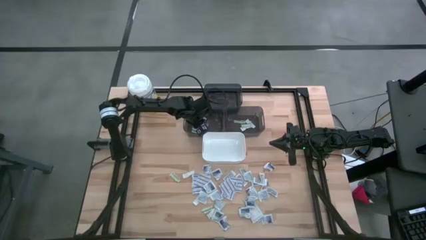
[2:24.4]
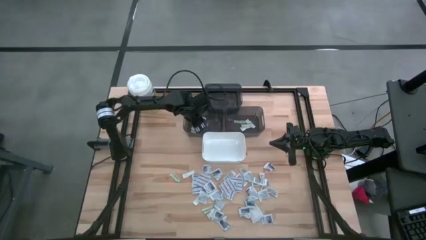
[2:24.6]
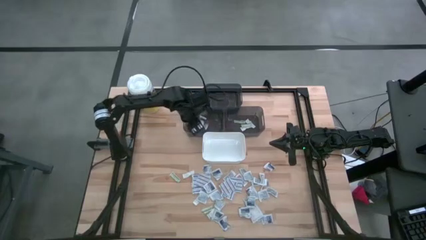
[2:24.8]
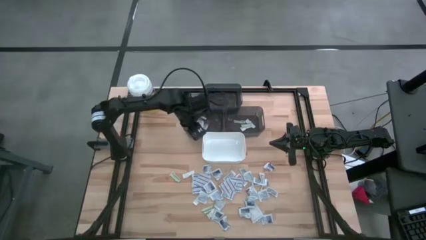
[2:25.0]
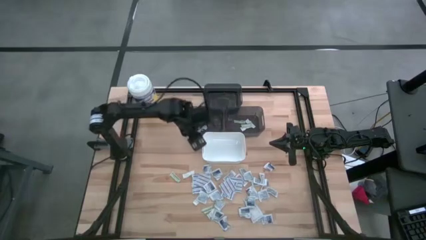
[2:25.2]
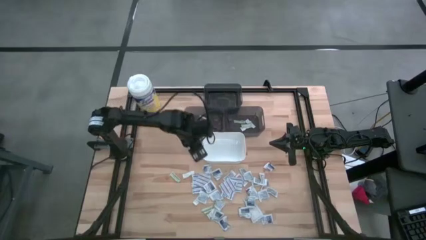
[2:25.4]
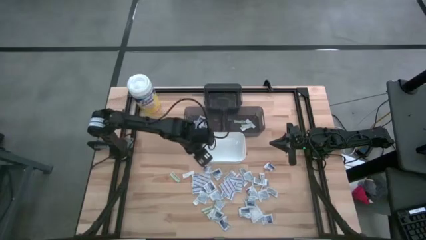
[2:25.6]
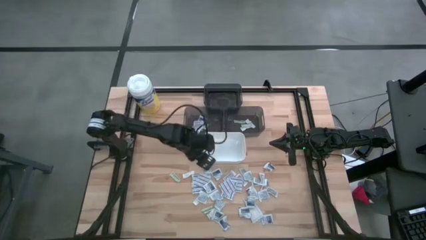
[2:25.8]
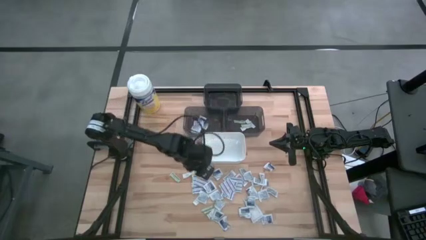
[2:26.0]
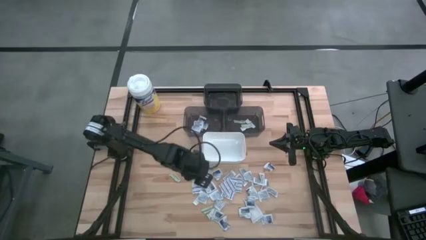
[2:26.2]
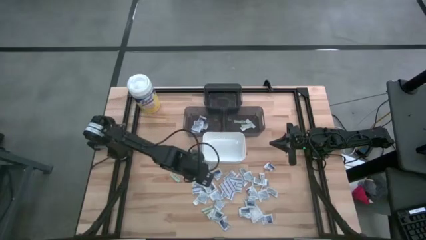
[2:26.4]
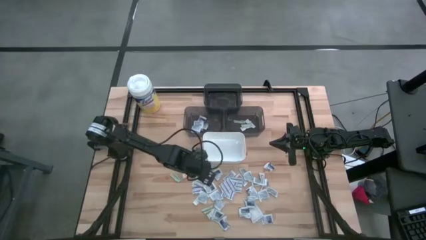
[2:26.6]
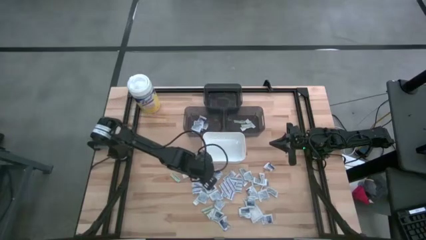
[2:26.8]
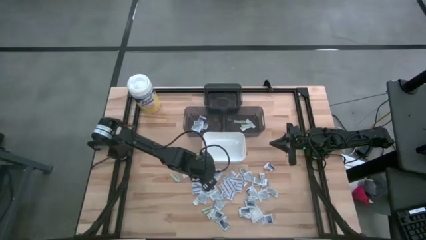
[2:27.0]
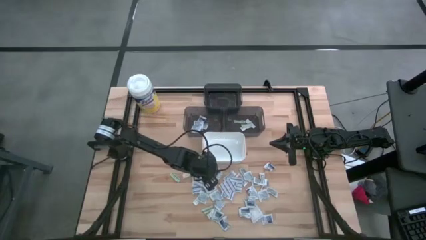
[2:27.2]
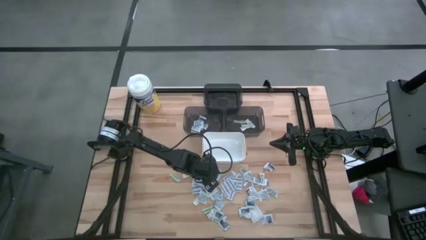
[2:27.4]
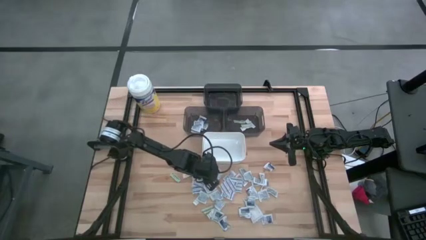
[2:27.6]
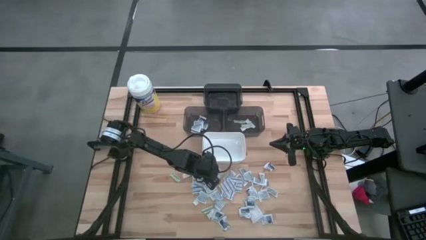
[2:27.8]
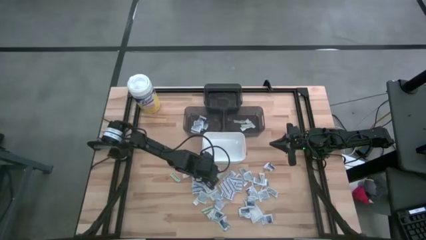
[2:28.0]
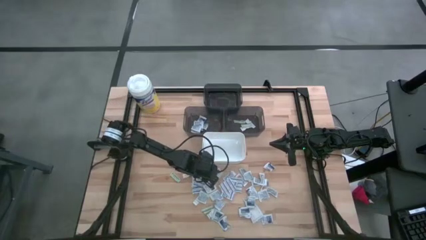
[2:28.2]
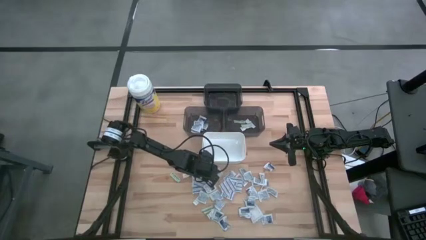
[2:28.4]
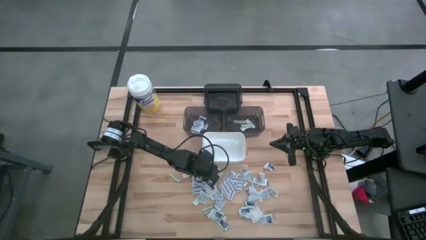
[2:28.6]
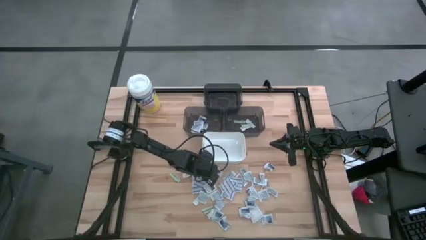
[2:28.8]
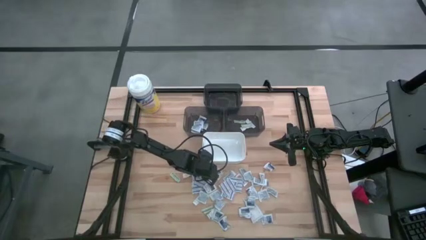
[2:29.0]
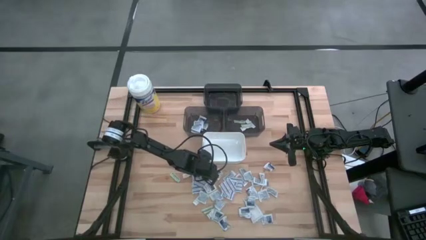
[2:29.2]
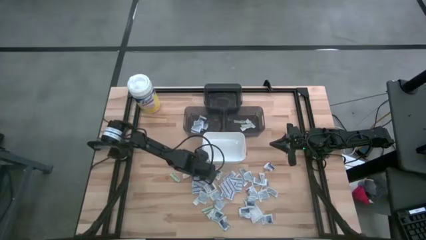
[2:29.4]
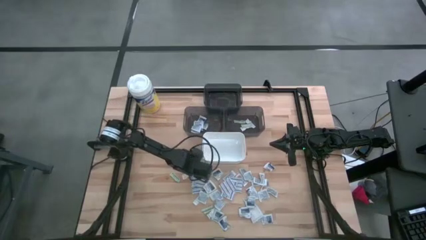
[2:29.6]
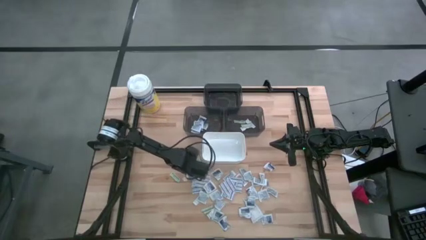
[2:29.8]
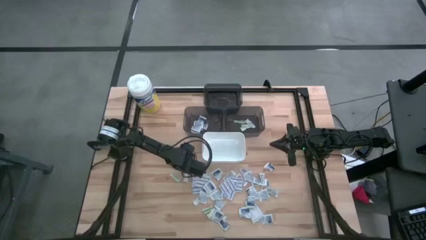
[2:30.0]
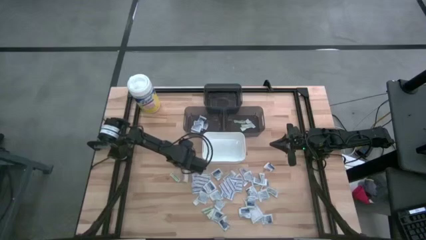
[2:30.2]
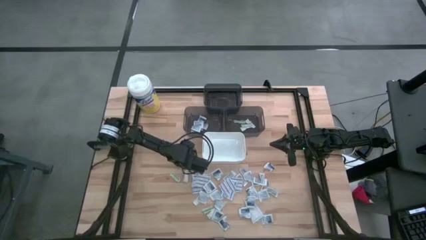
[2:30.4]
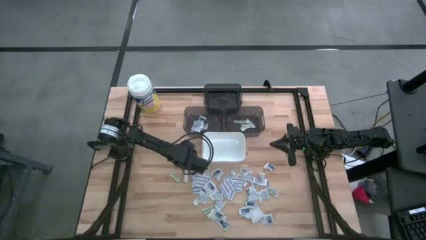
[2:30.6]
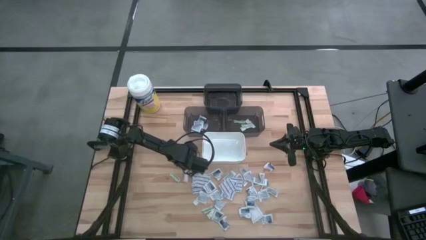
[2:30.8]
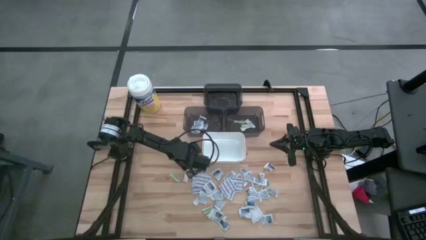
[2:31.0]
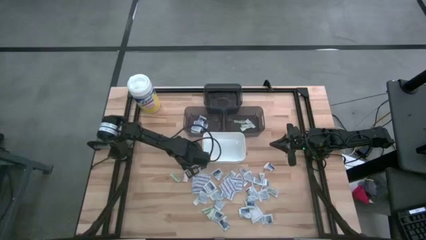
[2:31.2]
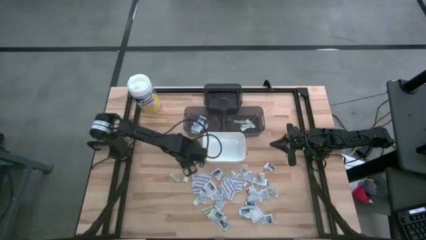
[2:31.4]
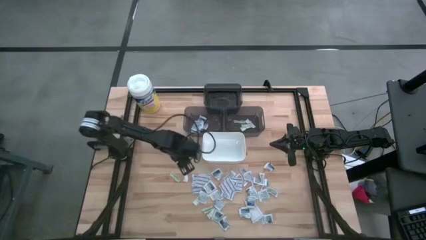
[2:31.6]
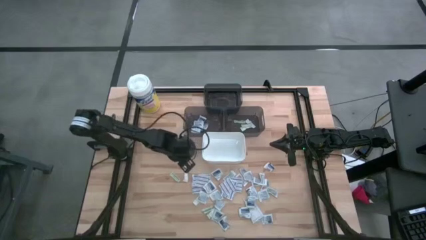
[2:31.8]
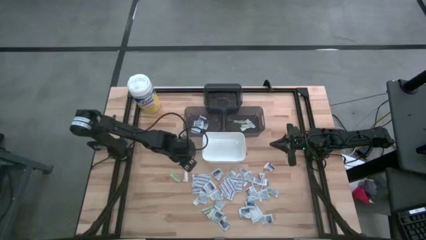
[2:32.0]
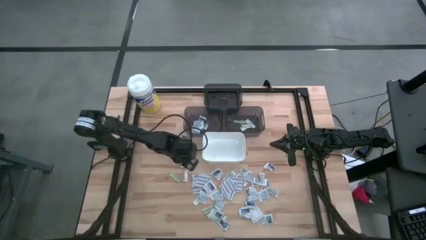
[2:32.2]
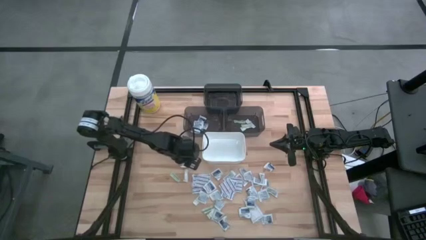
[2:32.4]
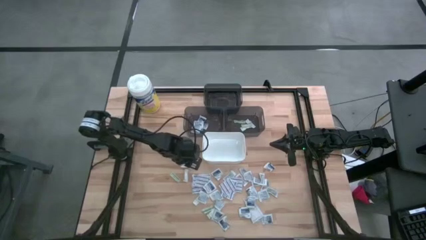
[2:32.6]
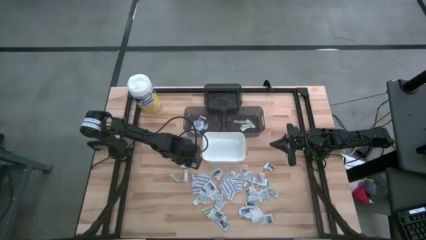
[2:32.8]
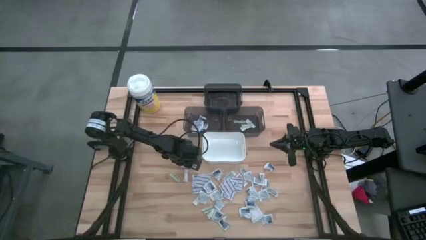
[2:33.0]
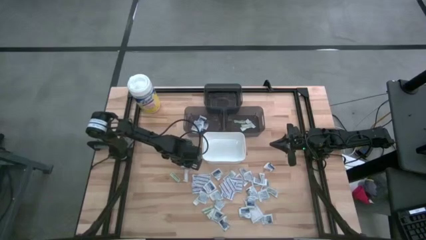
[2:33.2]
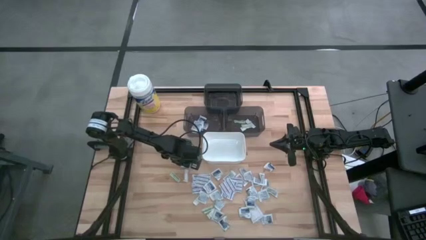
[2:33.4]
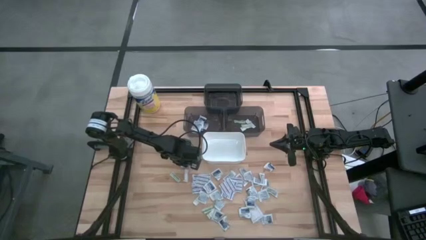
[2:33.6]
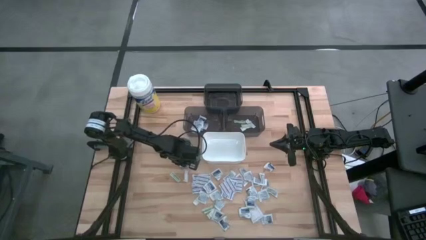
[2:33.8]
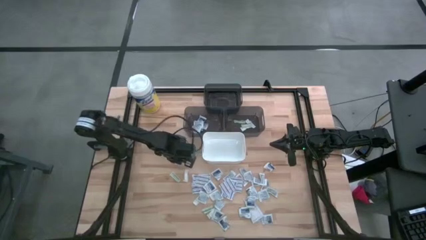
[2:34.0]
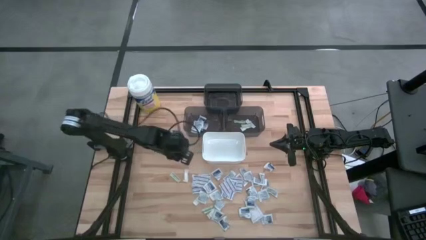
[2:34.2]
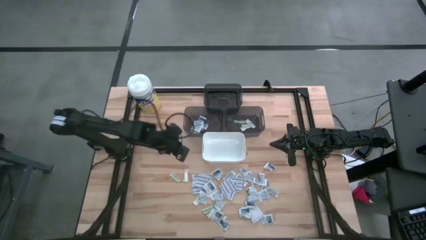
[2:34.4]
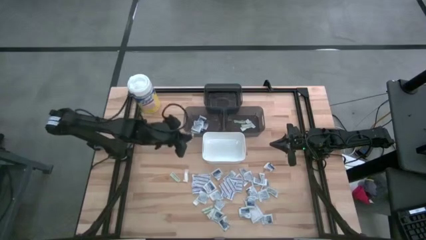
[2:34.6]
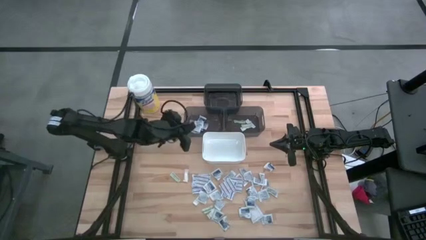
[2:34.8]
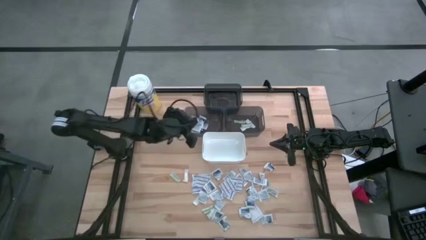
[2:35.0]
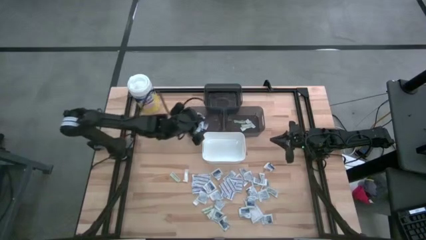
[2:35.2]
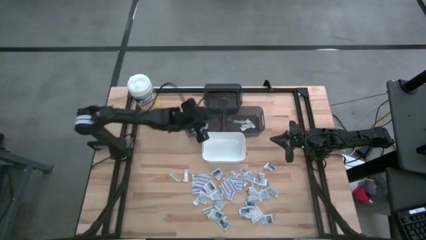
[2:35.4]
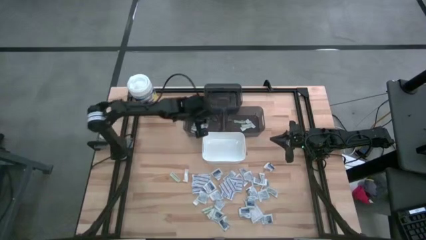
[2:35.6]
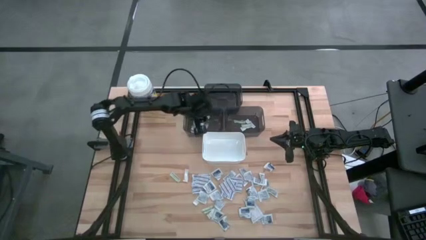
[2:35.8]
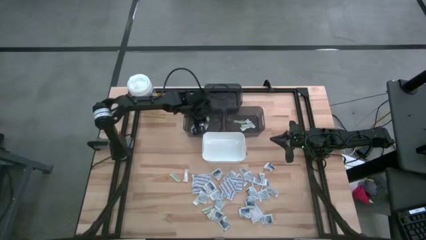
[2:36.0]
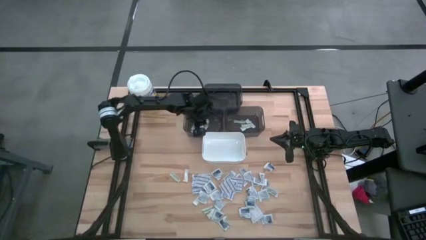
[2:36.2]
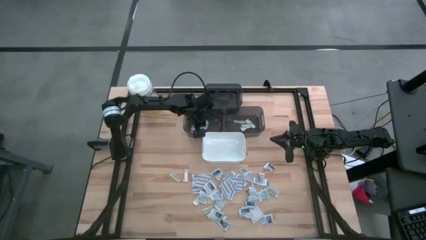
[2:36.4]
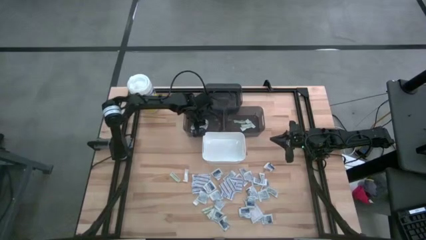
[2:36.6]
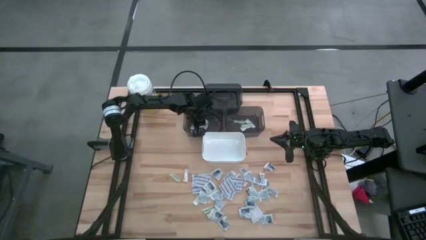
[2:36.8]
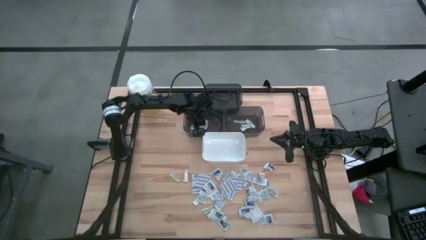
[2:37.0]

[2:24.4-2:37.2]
Task: Pick & Place First Aid Supplies
Put the alcohol pad into the bottom left black bin

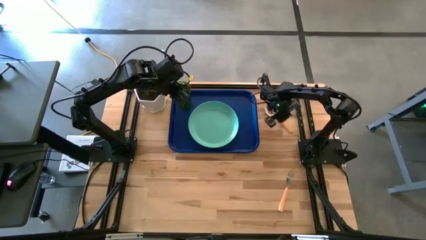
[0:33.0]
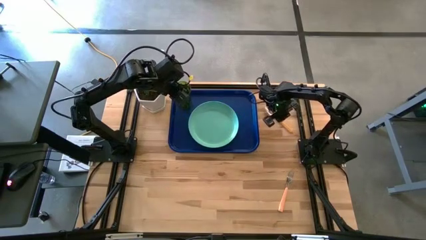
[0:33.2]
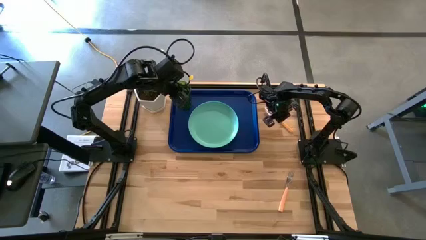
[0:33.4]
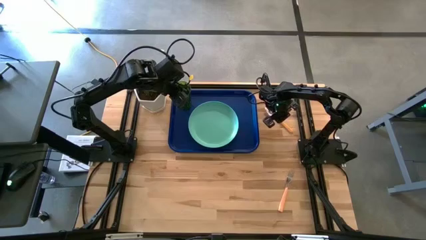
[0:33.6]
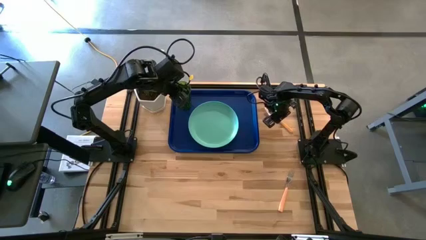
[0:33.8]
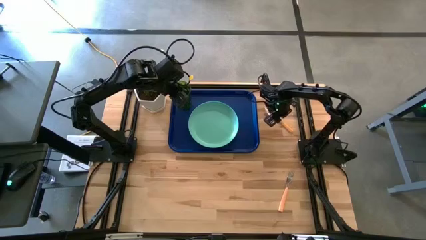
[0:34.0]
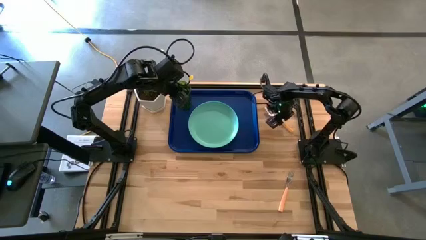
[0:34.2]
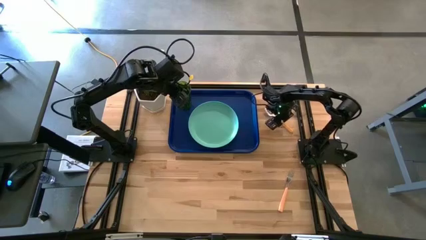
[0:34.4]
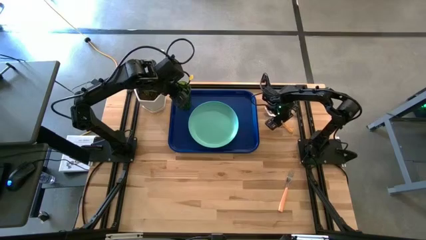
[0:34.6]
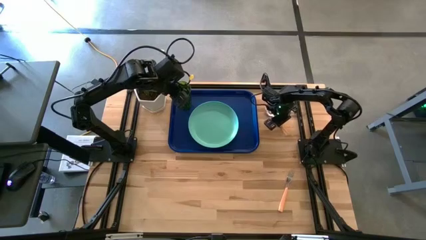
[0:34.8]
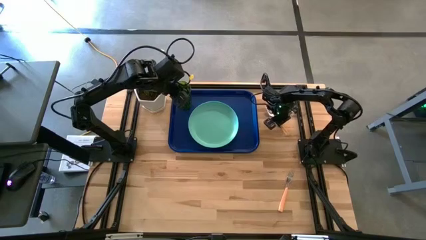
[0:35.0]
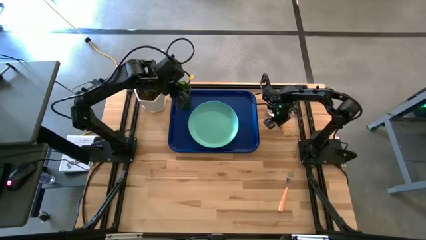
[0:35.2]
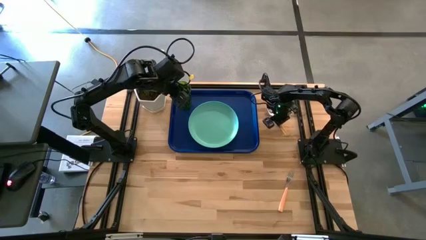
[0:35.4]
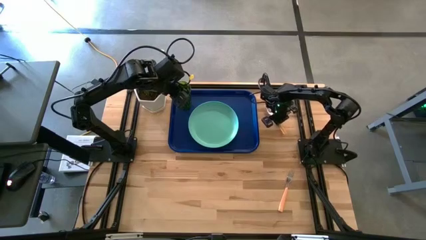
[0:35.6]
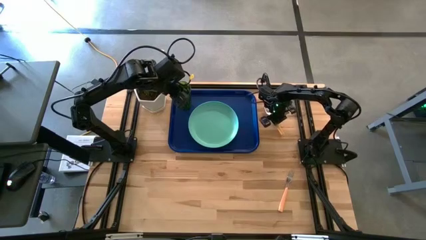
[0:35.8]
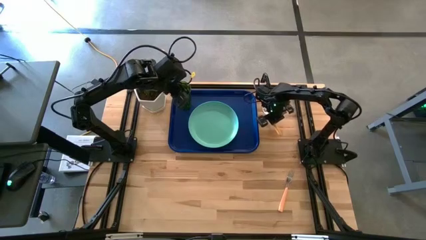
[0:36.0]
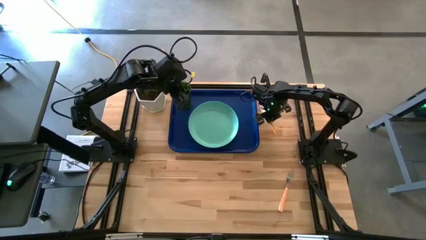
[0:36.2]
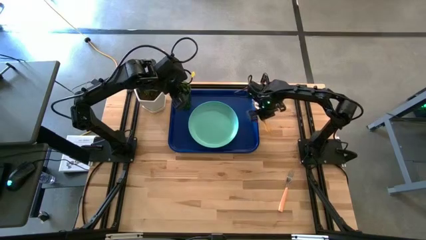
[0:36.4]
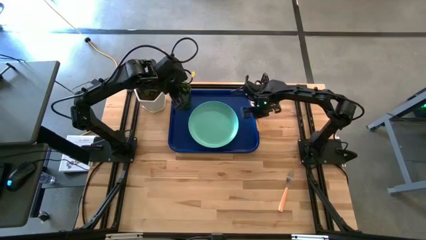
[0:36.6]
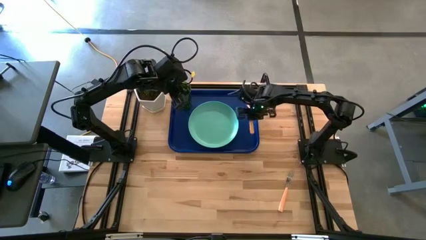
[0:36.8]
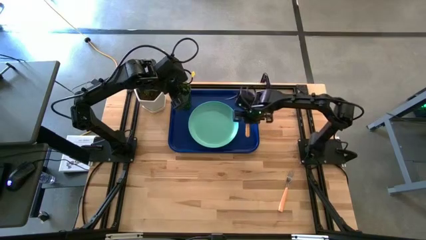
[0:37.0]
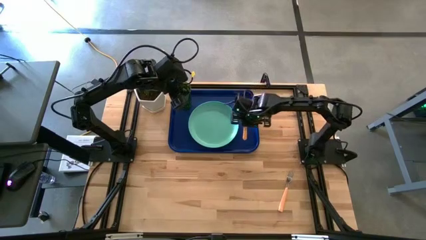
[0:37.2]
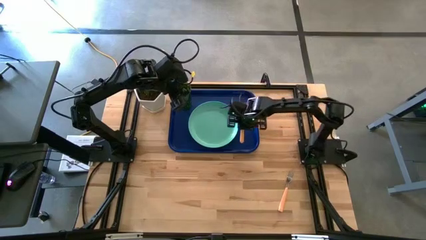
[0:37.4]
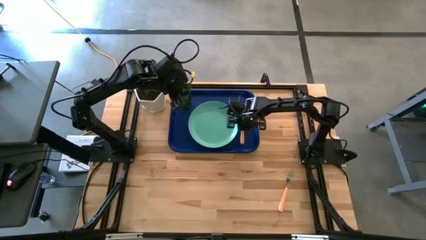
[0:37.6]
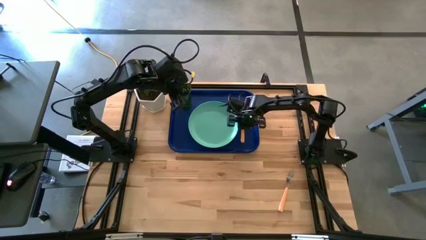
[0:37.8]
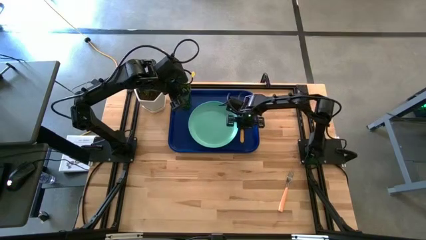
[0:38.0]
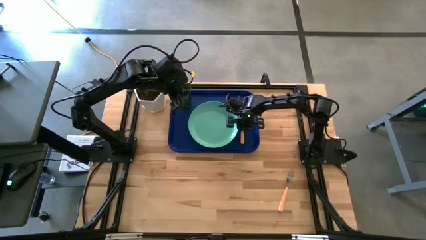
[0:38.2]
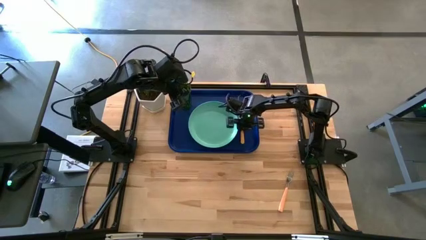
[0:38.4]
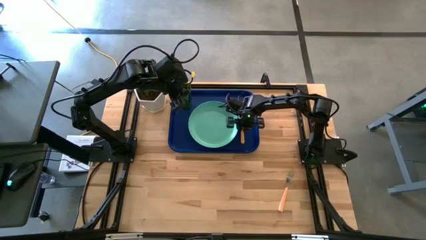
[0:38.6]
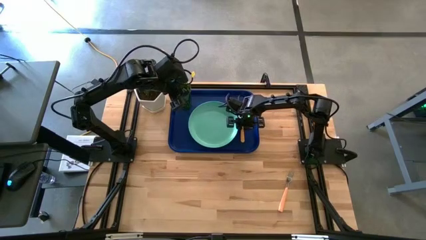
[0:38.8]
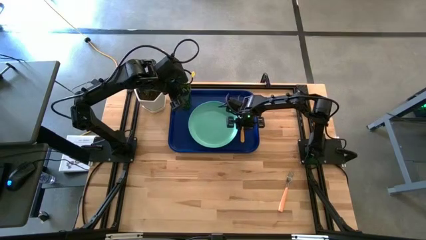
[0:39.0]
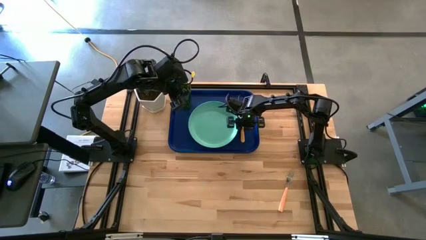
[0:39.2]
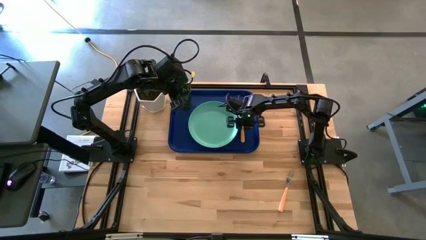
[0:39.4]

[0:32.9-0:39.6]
Task: Pick and place plate/cup/fork/spoon on tray
Put the orange spoon on the blue tray to the right of the green plate
